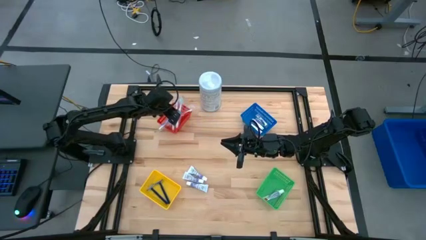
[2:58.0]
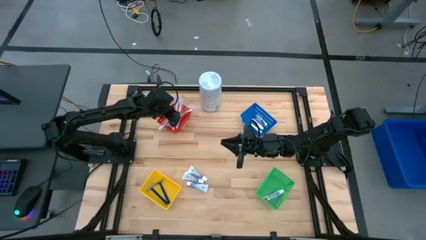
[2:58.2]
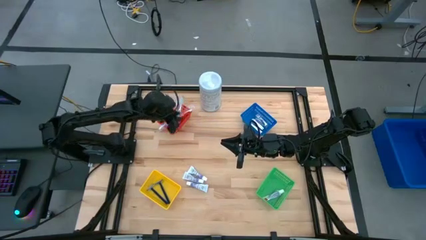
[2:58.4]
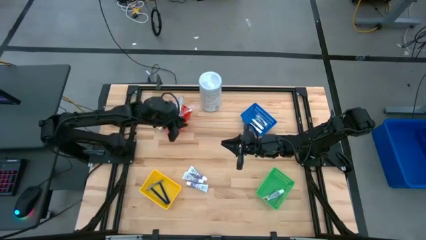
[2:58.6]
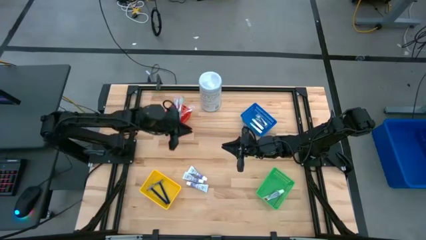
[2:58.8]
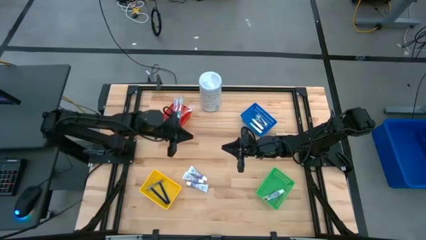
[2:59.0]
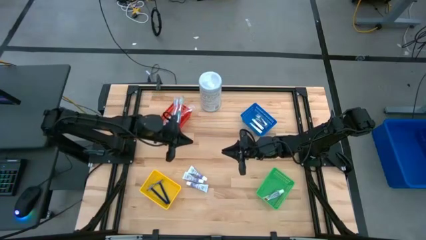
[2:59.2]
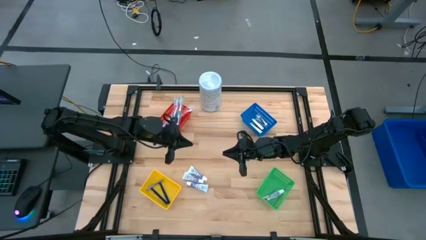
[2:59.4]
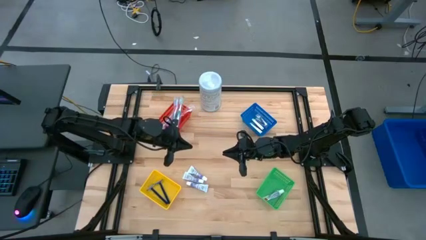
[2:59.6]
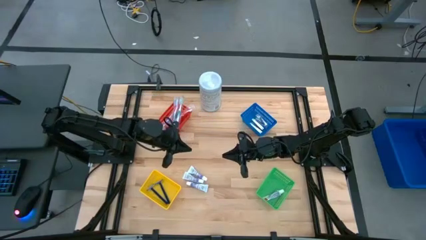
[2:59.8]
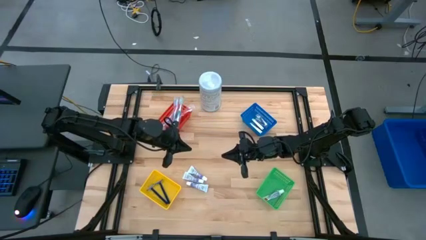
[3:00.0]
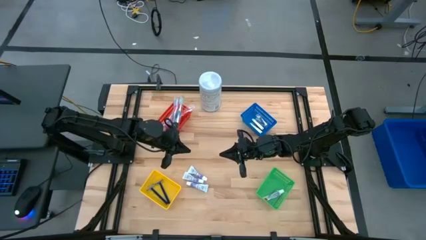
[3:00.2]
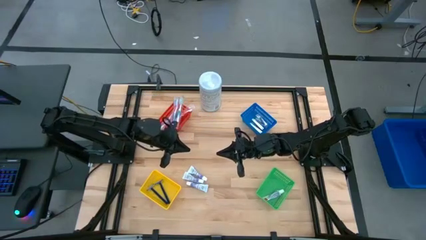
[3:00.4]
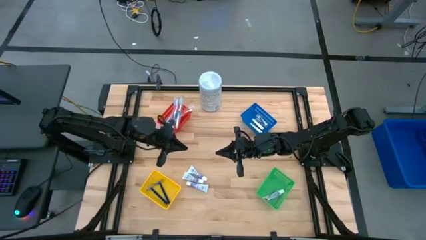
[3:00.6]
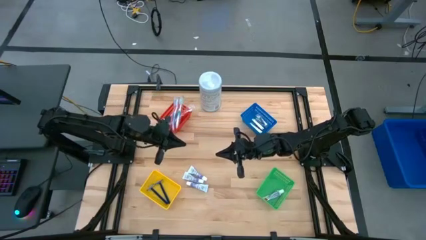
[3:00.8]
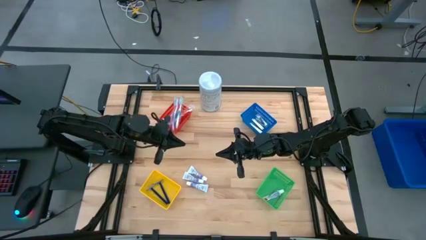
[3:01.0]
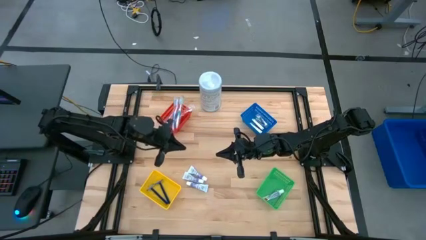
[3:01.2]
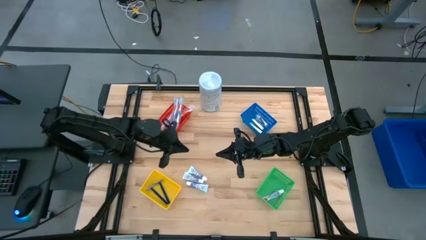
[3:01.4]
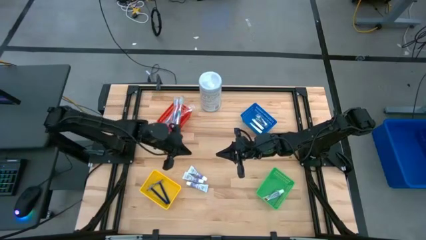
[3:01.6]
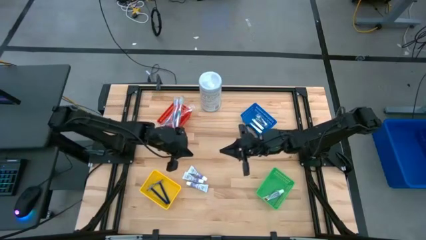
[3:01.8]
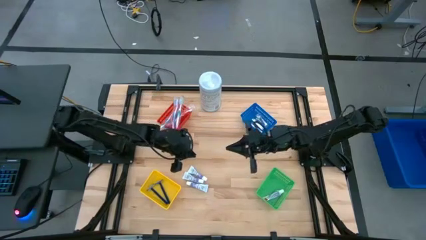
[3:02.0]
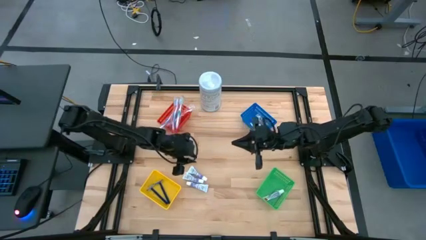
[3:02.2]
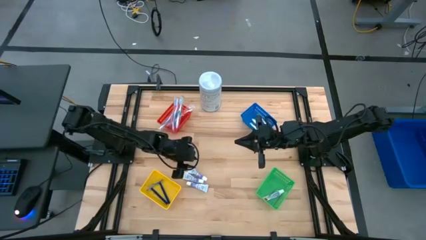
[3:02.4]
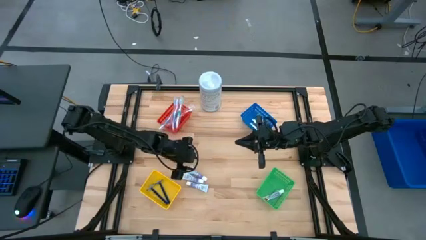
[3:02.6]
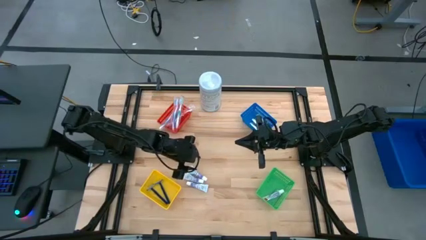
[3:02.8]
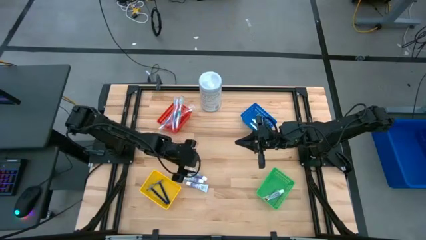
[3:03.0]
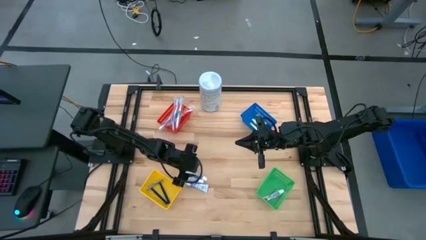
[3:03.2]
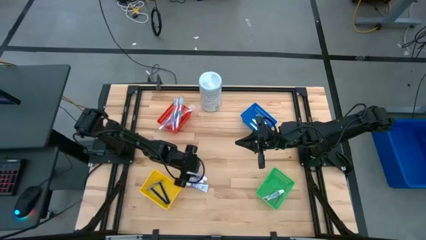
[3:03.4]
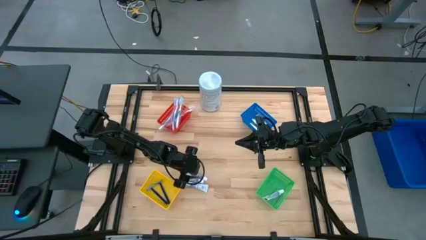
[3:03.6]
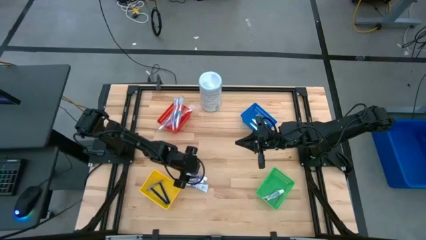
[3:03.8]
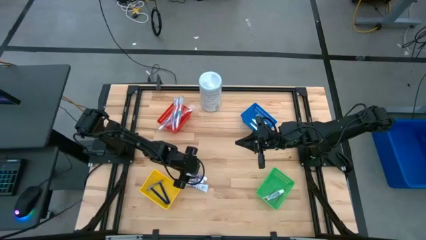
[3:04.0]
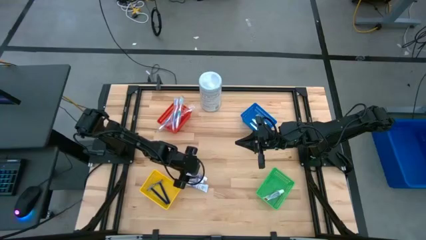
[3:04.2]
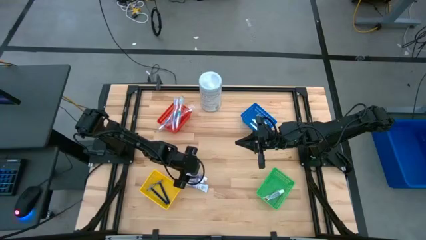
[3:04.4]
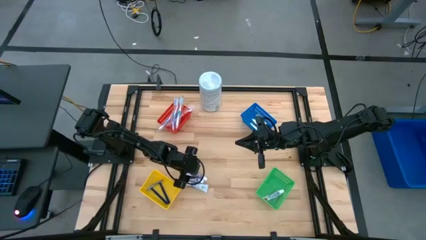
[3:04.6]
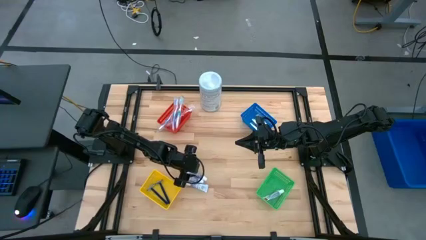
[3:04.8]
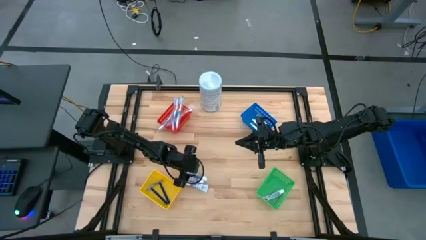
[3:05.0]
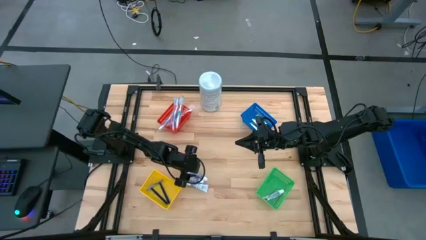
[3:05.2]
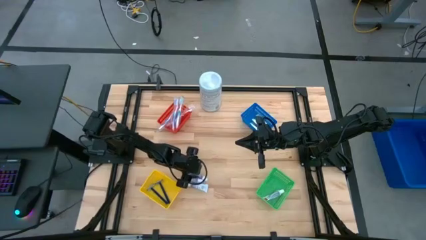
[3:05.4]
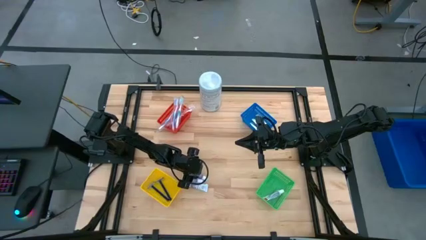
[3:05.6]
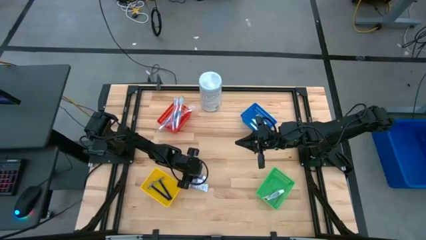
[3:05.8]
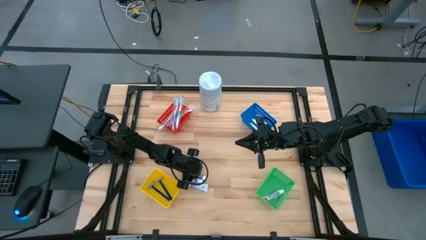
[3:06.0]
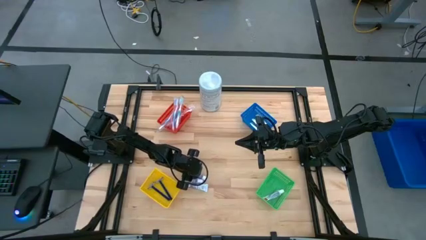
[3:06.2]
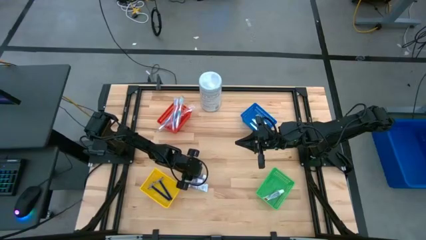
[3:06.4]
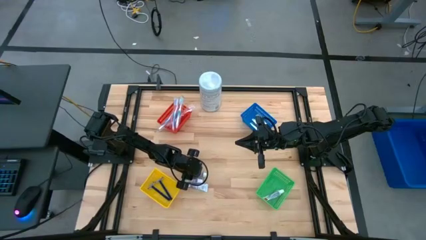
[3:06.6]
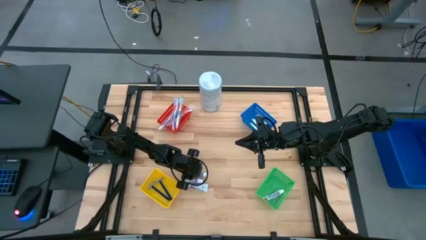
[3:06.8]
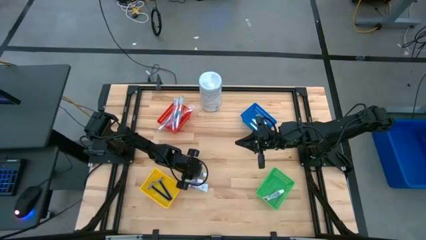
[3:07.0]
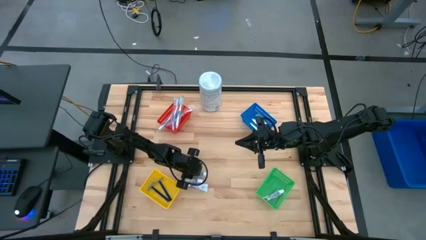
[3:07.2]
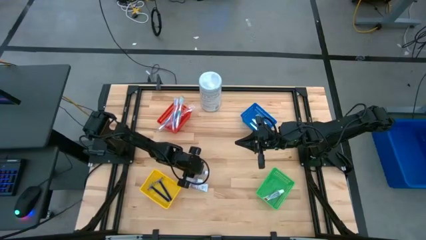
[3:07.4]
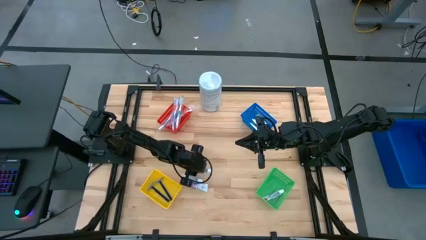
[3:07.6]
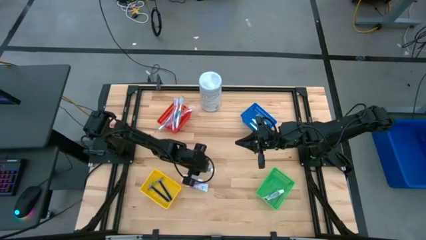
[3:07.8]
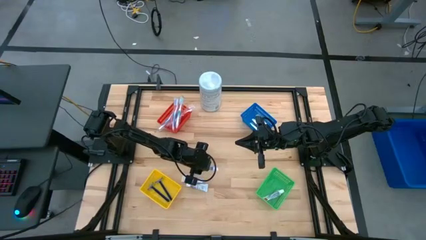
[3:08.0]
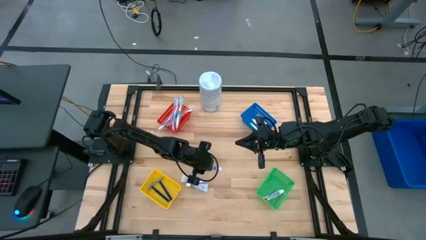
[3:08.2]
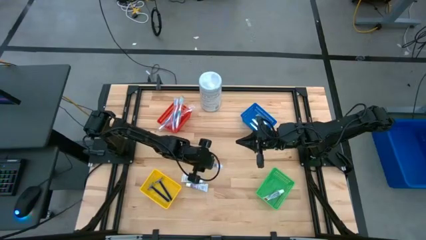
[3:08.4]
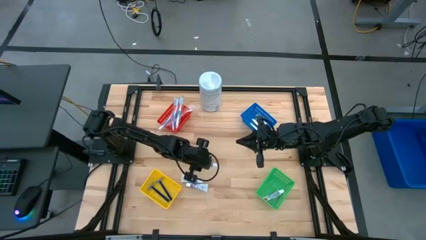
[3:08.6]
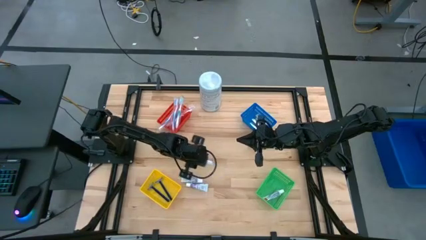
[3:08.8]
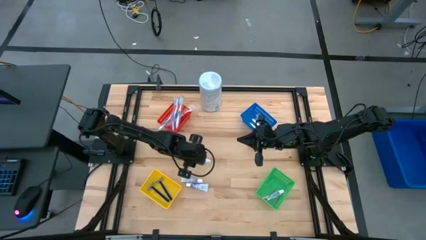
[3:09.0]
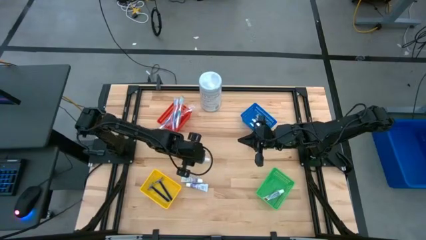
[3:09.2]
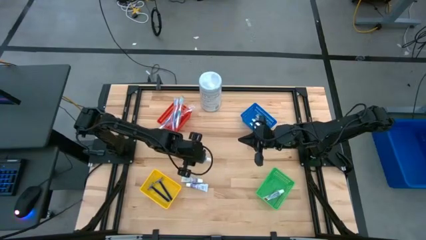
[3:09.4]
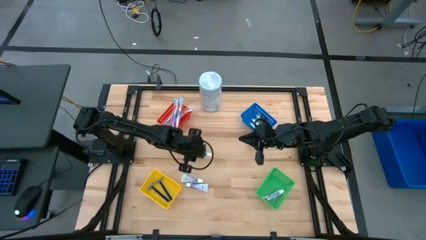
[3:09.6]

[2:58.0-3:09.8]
Task: Pick & Place Travel size toiletries
Put the white toothpaste into the green basket

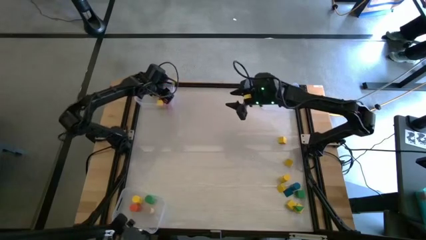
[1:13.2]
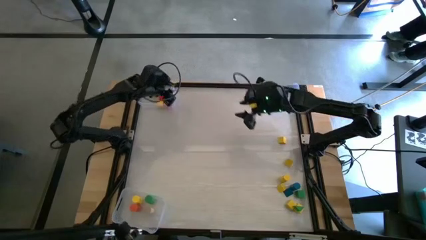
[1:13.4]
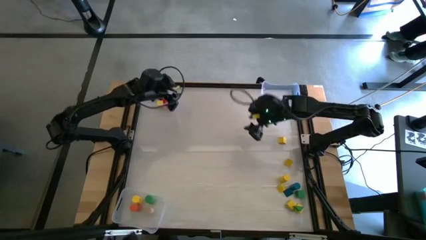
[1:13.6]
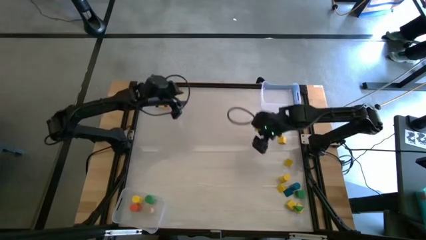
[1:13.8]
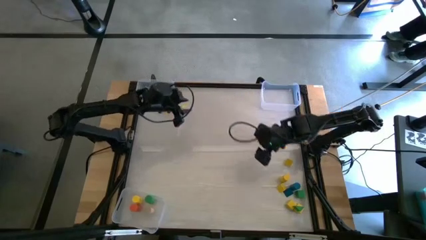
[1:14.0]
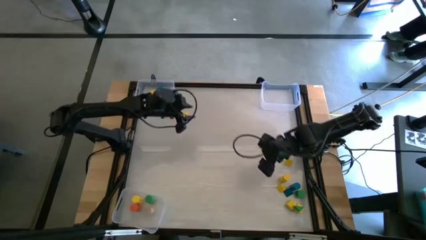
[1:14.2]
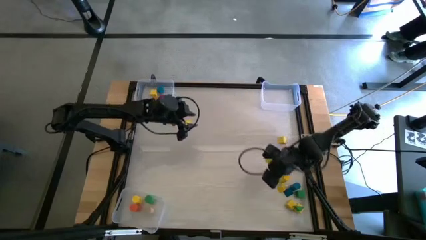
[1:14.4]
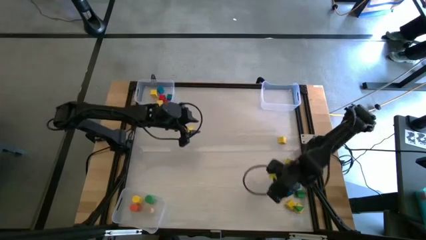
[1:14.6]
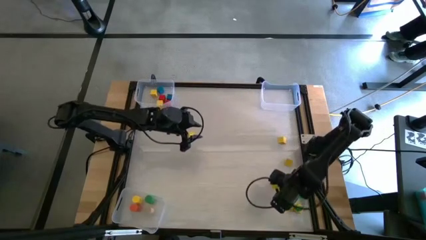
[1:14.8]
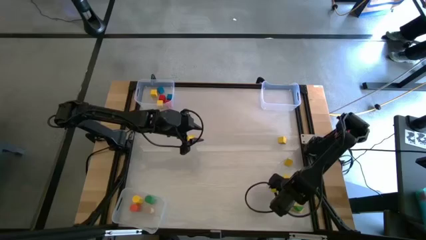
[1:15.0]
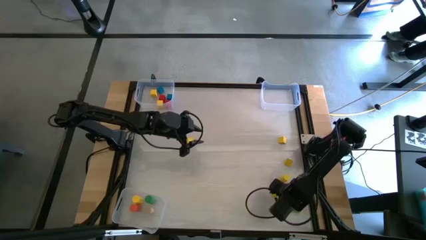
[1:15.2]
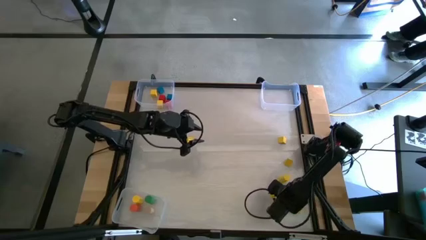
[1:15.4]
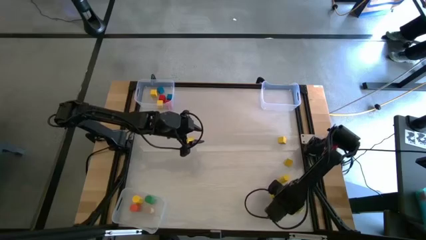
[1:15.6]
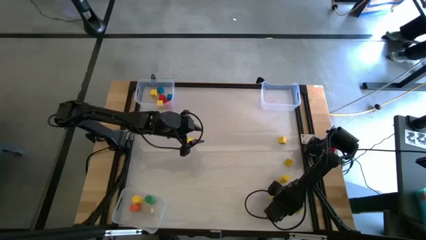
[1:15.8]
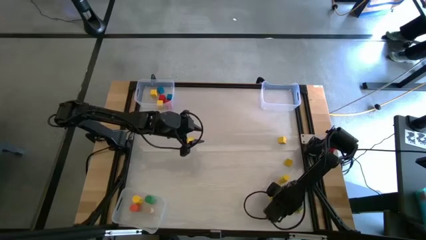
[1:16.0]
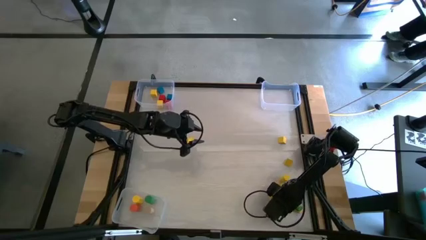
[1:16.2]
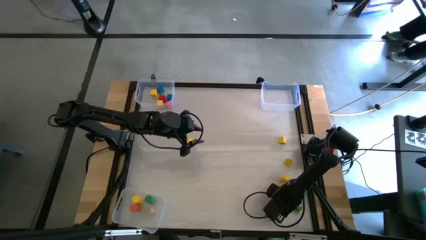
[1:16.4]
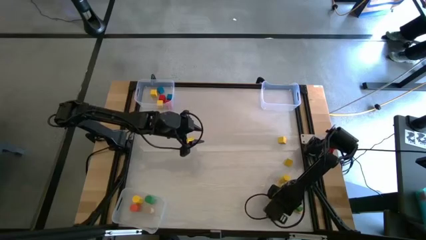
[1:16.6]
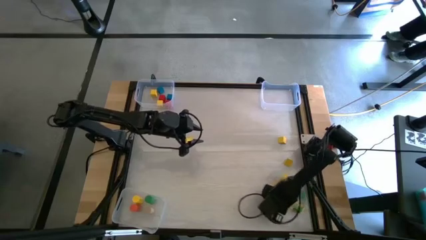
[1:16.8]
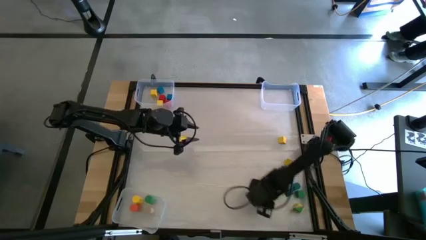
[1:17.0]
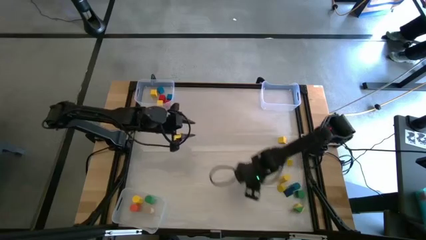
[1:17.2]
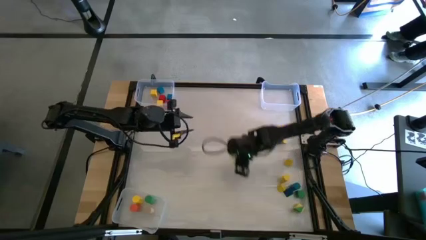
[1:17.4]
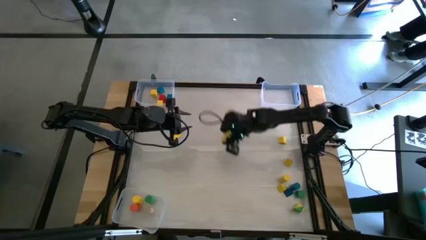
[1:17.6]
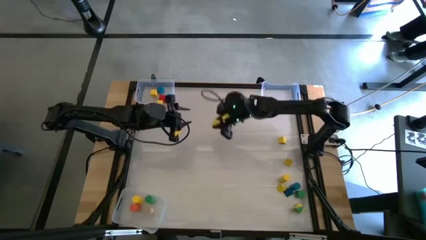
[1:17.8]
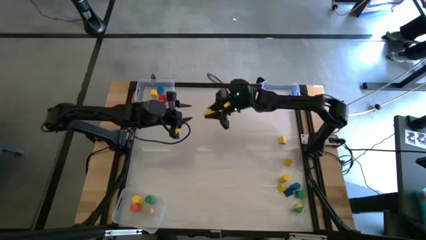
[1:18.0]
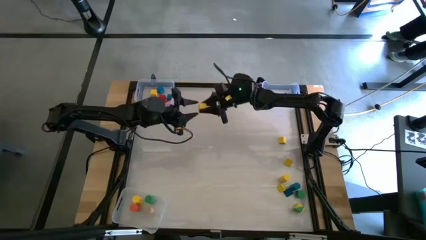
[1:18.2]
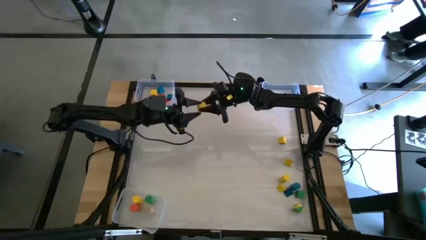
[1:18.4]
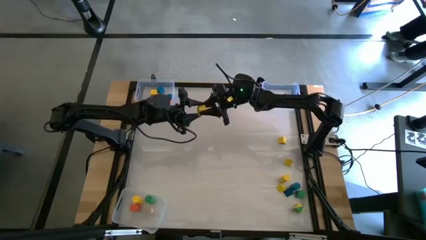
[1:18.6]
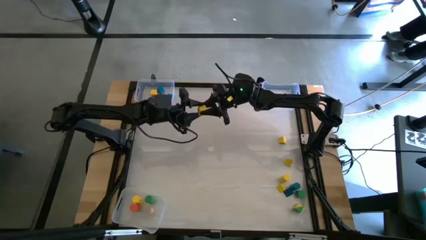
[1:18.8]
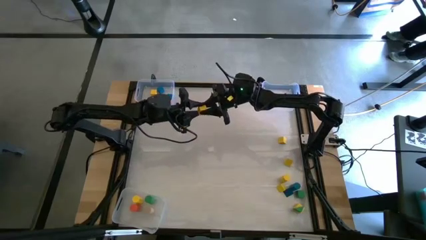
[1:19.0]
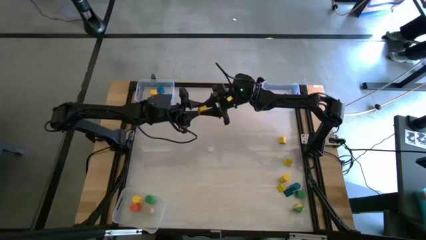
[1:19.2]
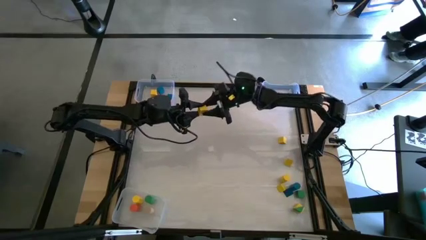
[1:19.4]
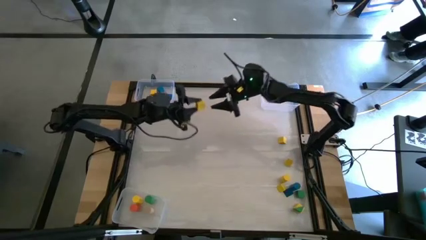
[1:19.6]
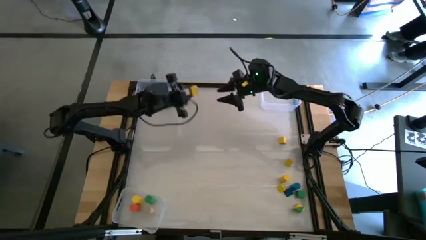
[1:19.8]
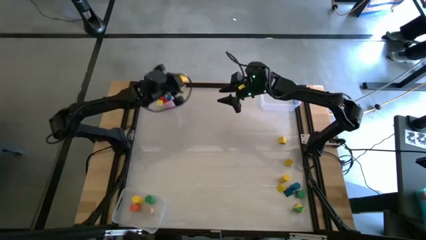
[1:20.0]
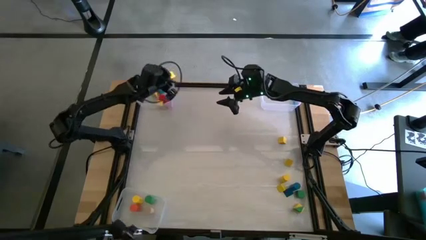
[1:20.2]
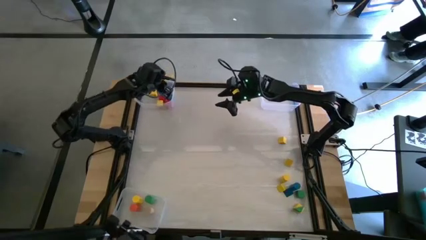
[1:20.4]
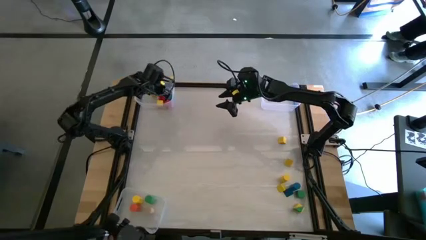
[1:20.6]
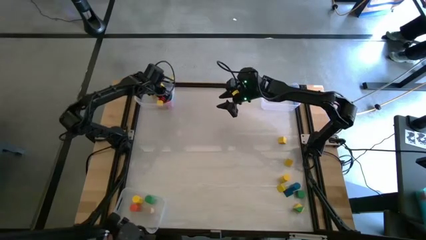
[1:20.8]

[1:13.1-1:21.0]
Task: Sort blocks by size
Put the left yellow cube block into the top left transparent bin
